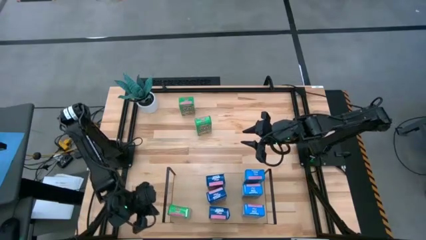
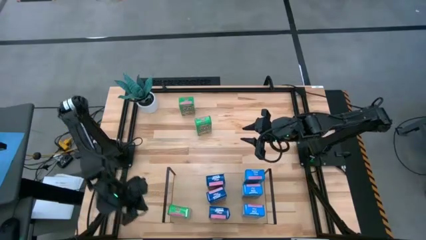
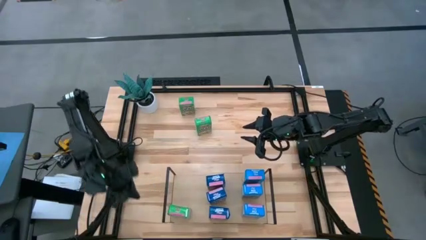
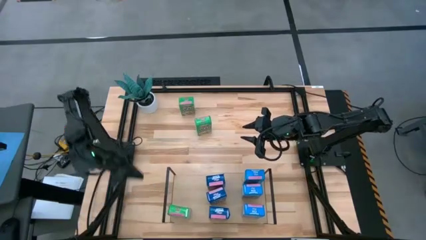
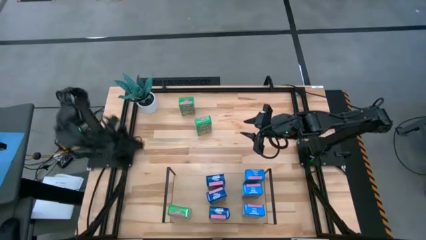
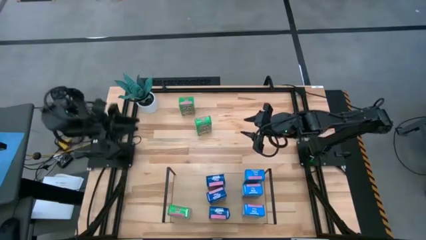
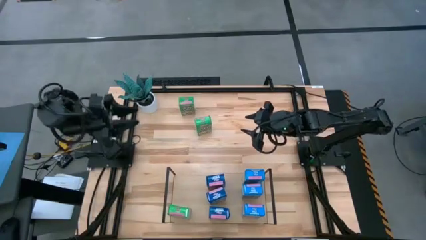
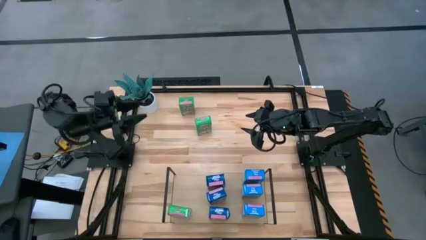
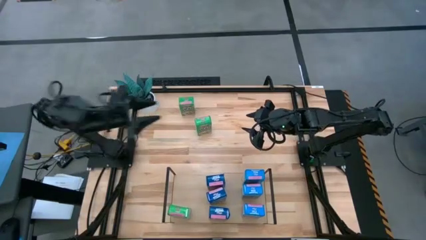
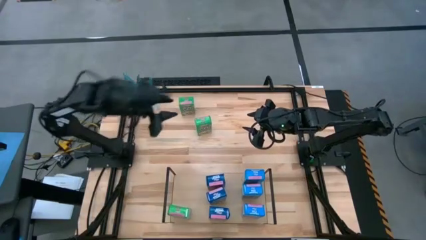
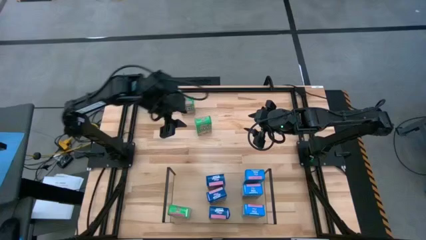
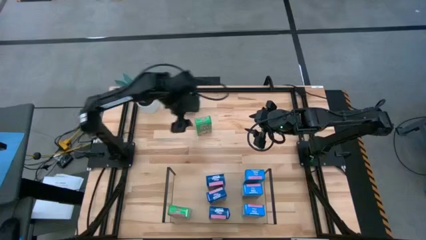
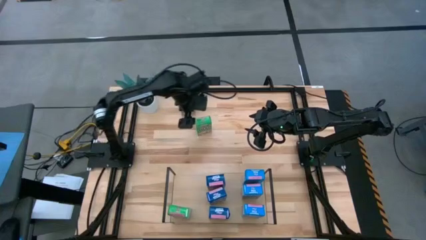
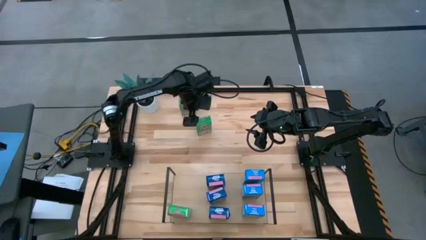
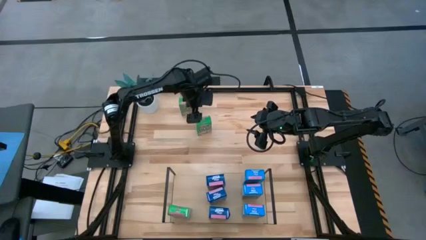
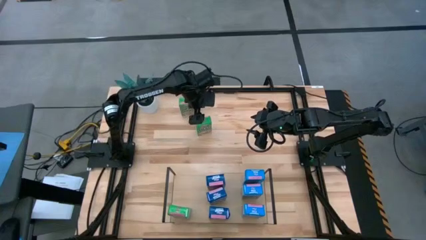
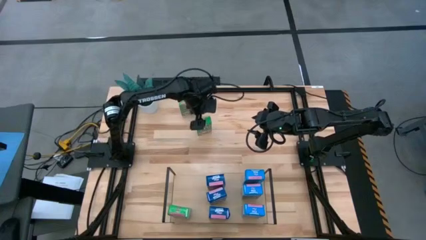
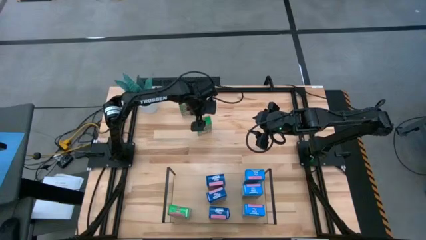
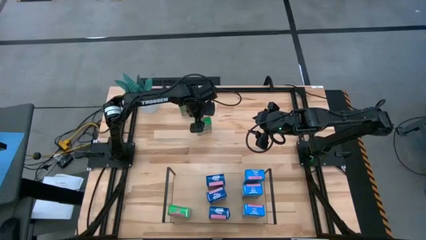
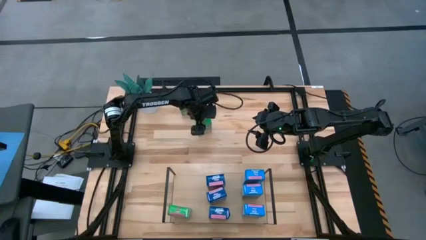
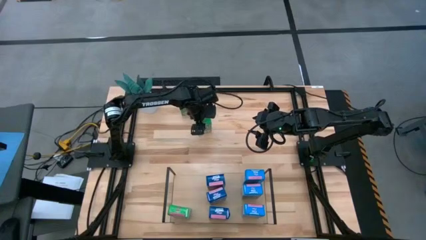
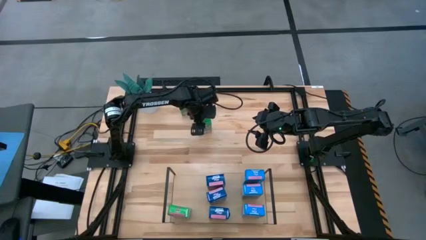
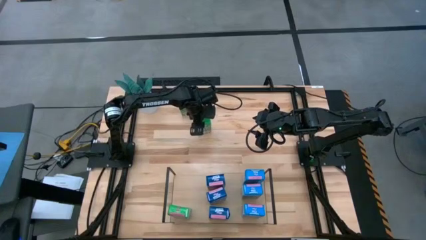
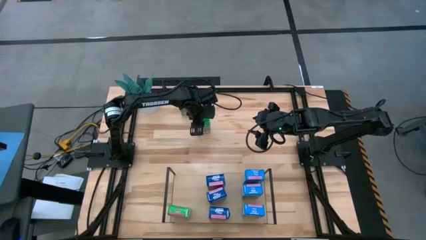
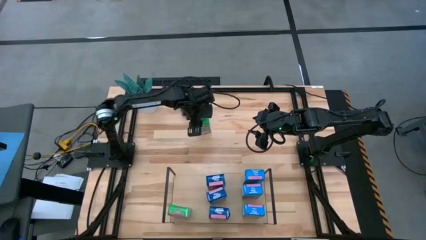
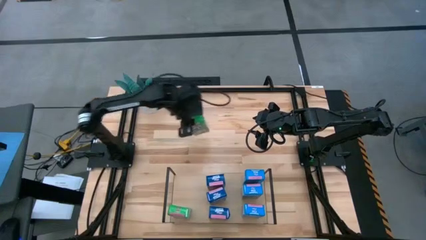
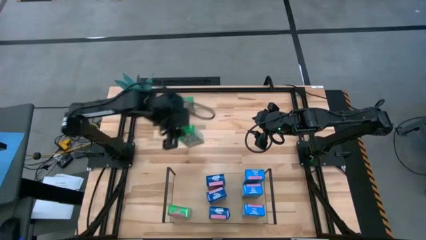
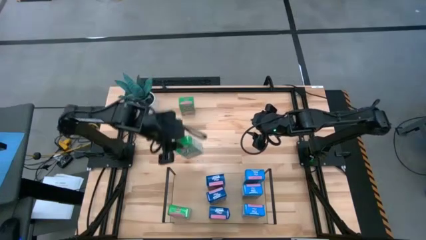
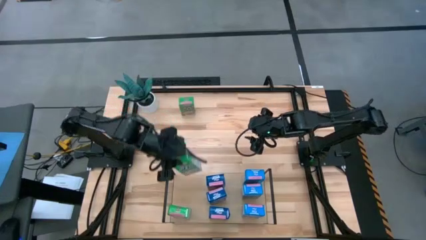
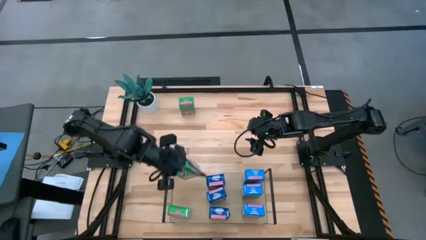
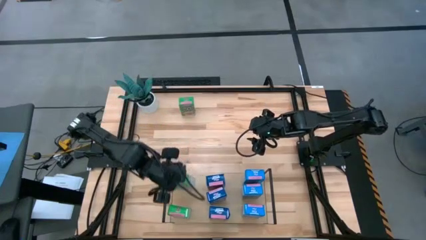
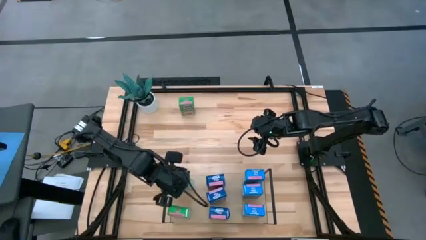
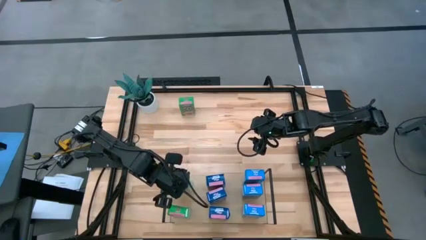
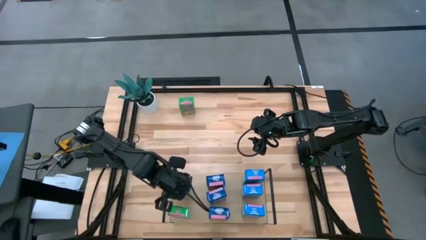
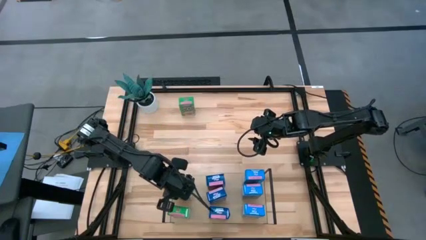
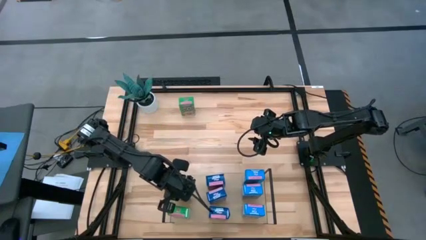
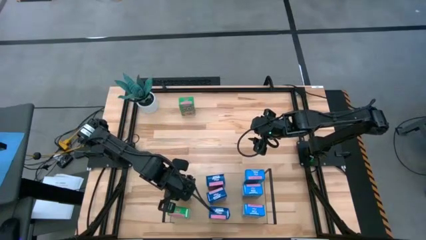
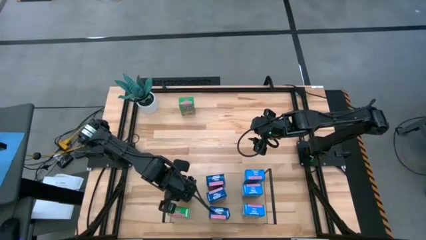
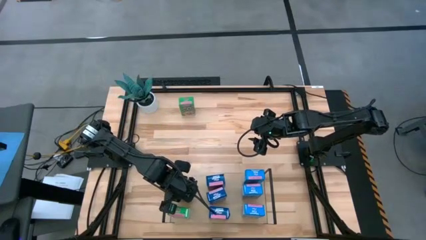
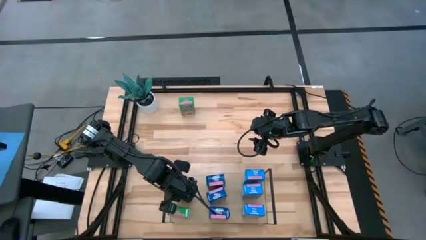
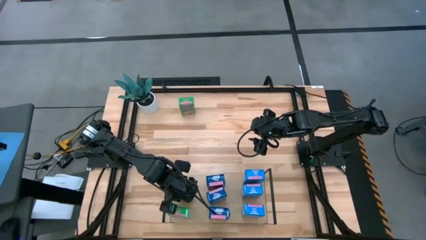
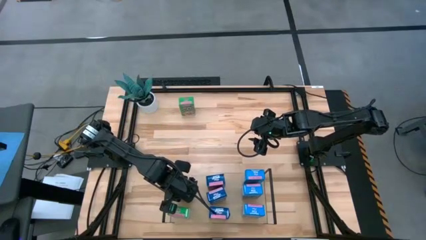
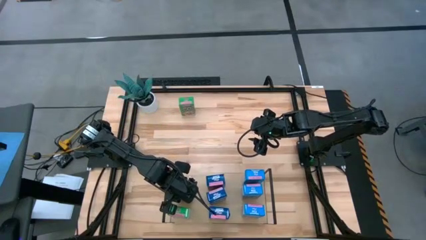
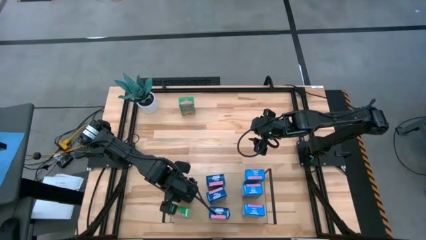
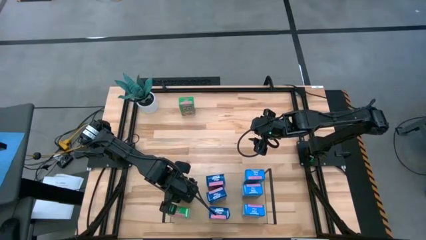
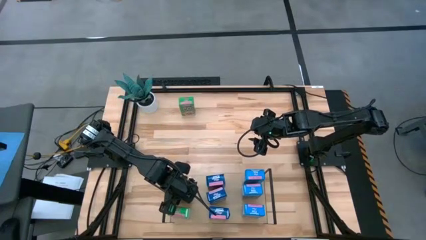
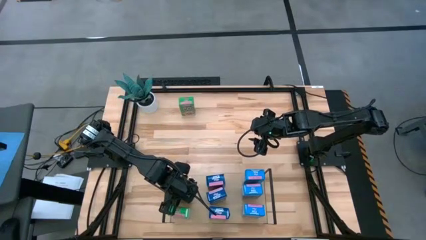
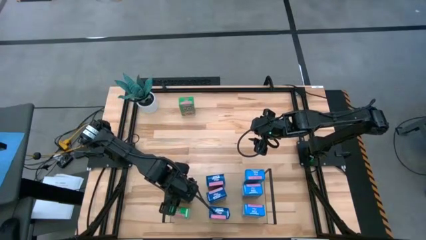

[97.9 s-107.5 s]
Task: Stack cereal on shelf
Put the bottom green cereal box on the shelf aligned with the other green cereal box

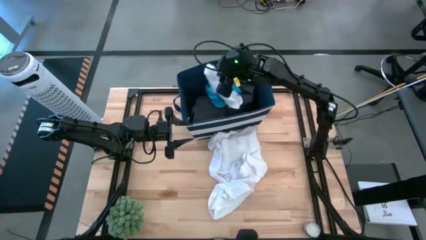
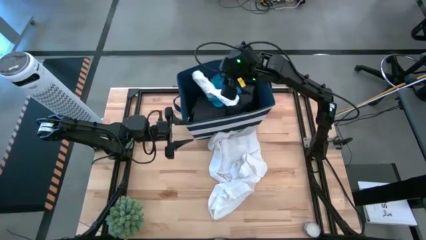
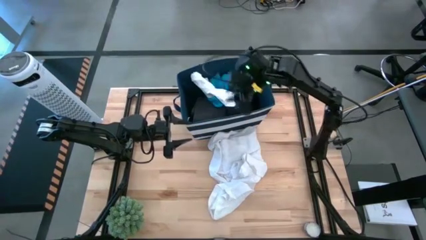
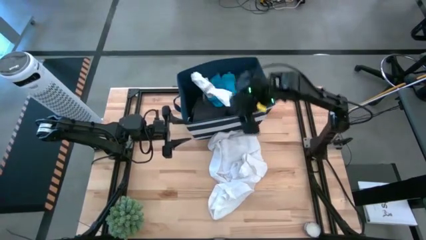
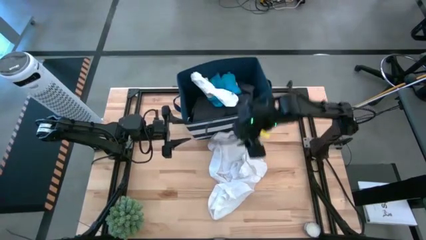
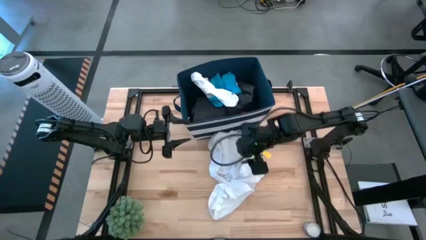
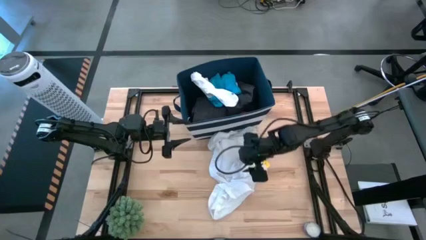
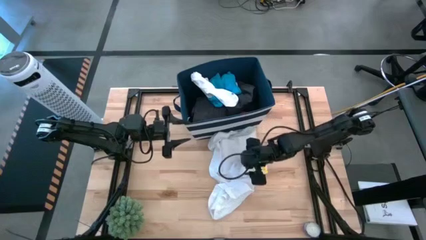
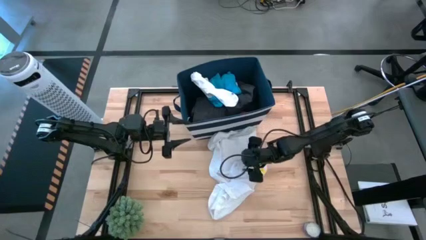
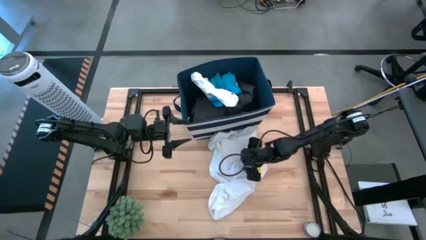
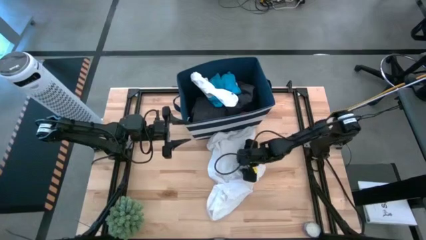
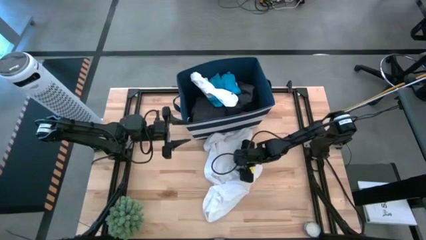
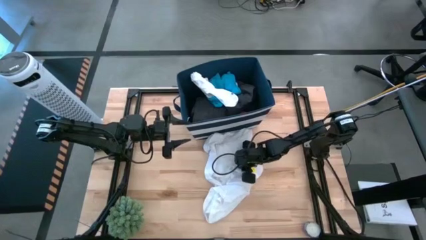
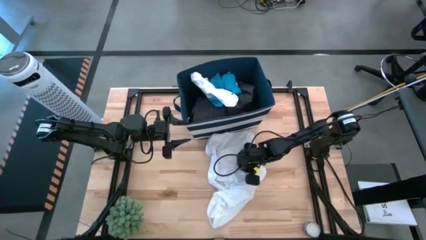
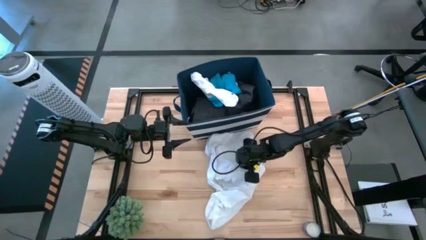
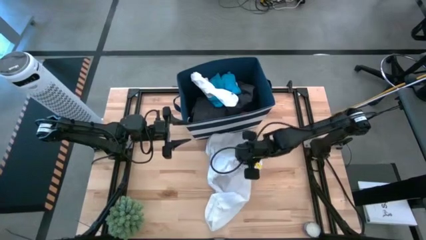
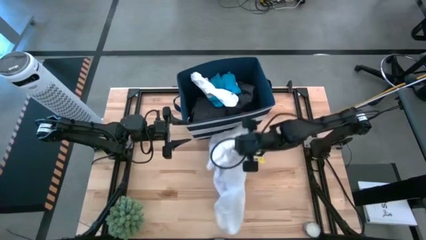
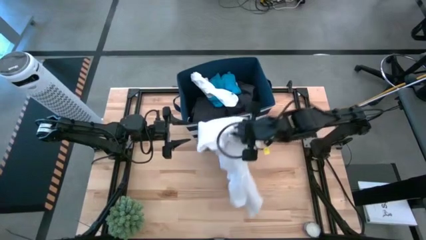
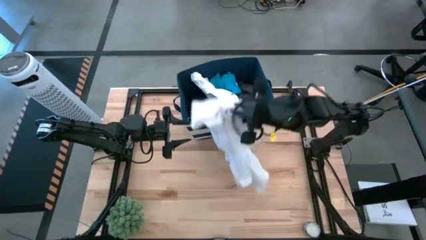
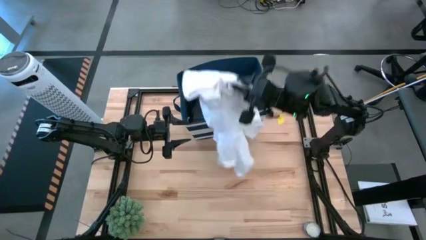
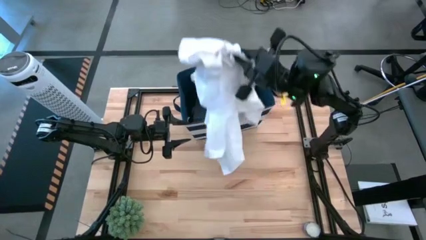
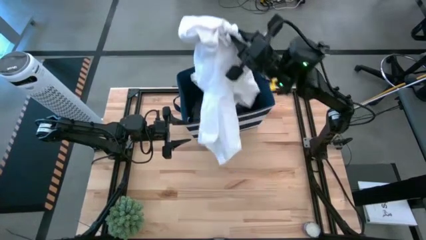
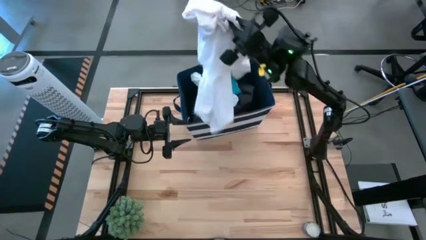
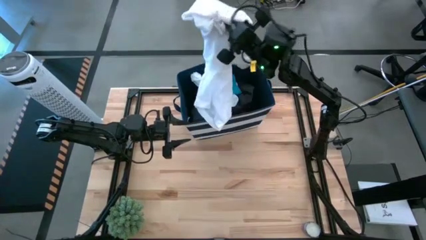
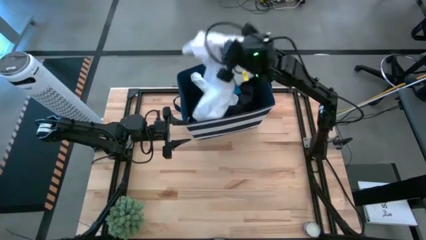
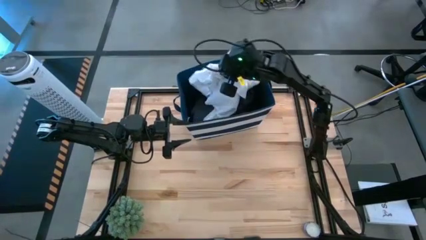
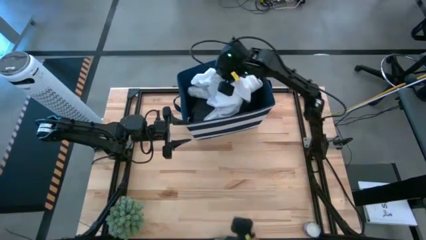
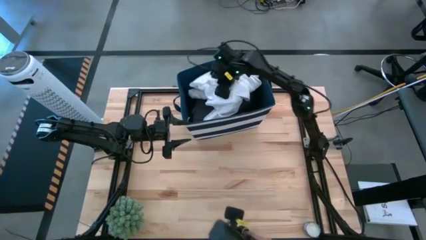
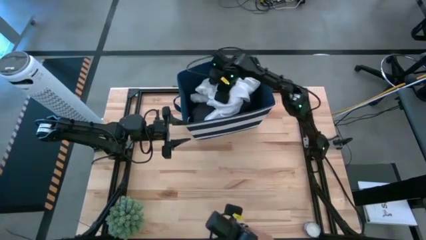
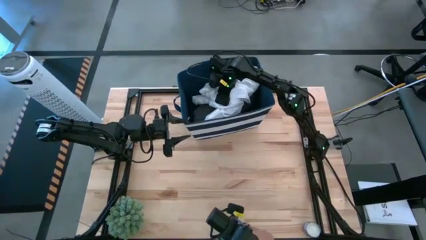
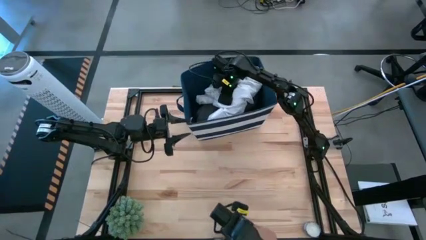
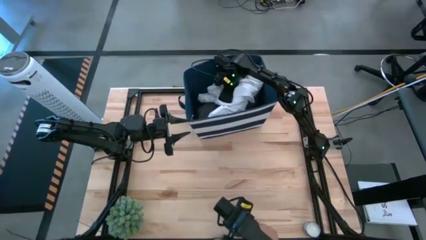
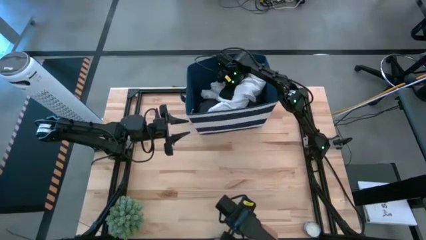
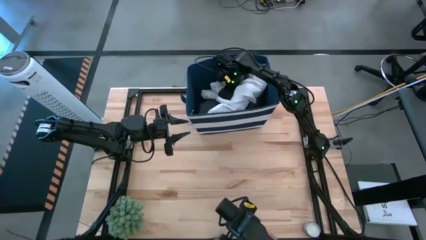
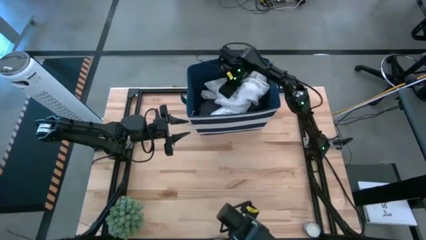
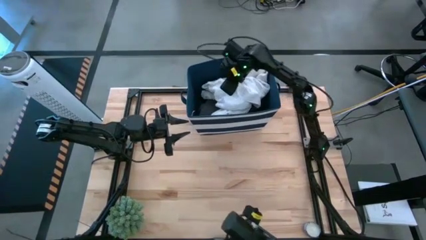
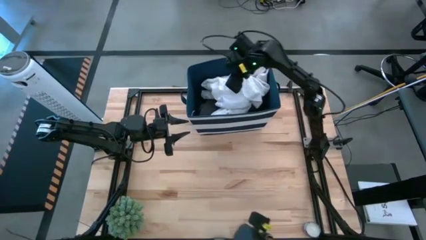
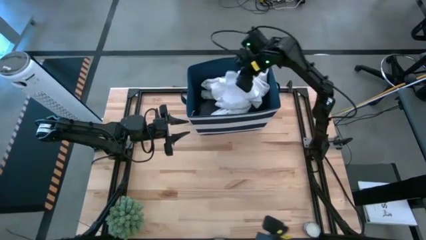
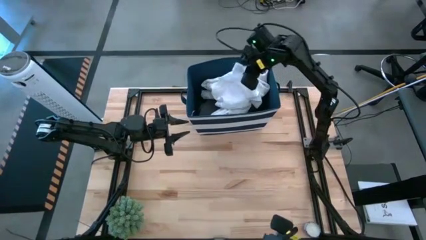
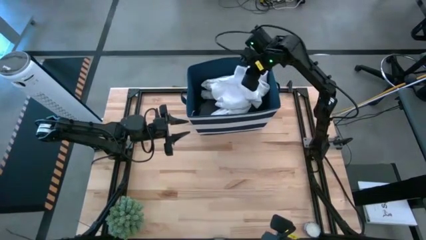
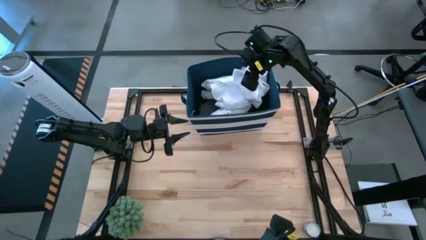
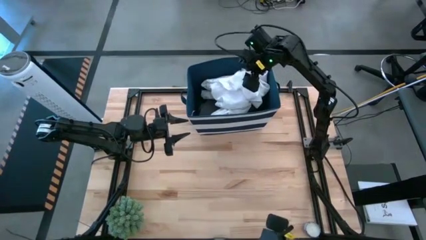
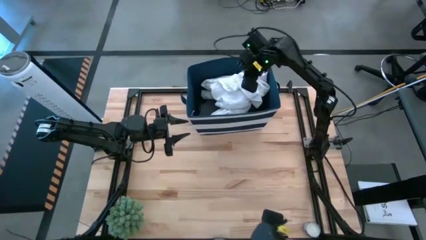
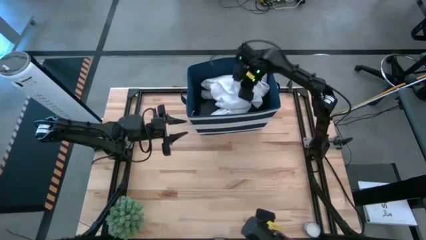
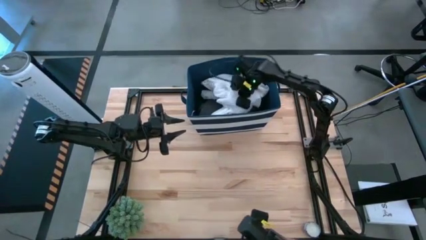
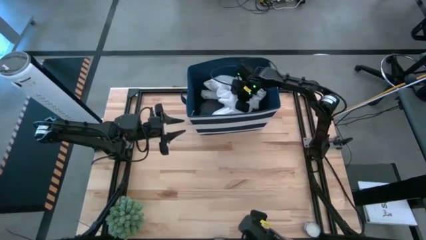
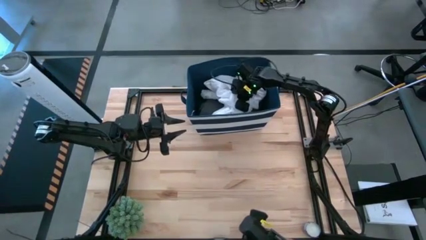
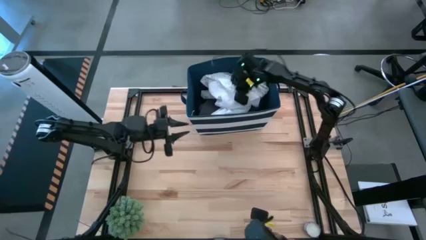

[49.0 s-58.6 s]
Task: Sort clothes
Put the white polo into the laundry bin
